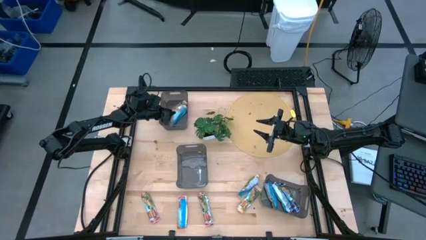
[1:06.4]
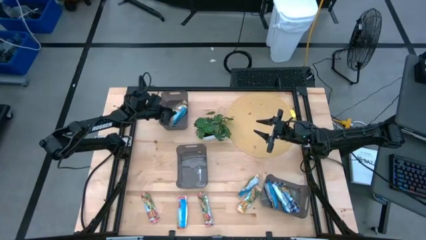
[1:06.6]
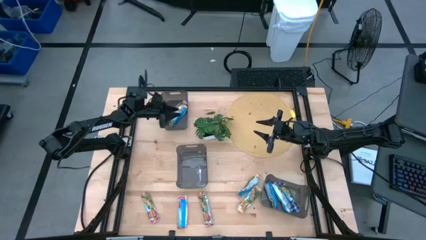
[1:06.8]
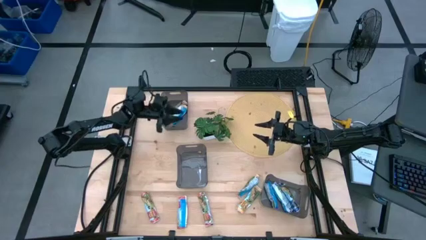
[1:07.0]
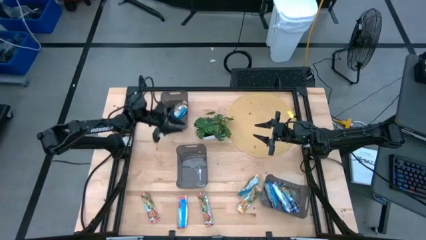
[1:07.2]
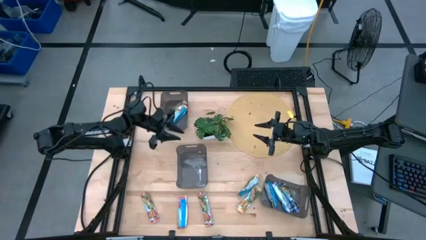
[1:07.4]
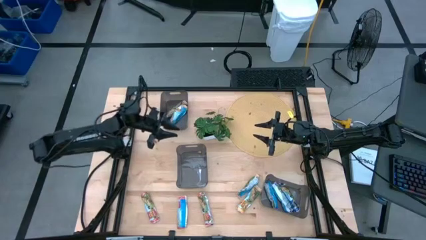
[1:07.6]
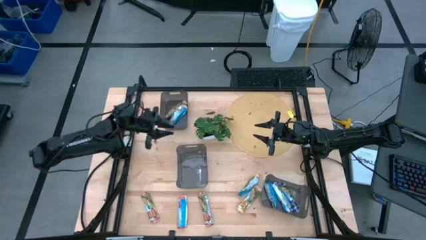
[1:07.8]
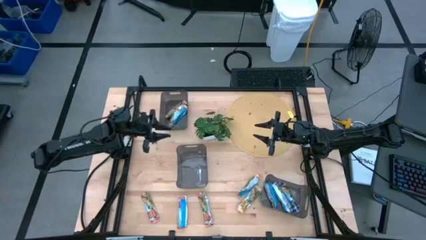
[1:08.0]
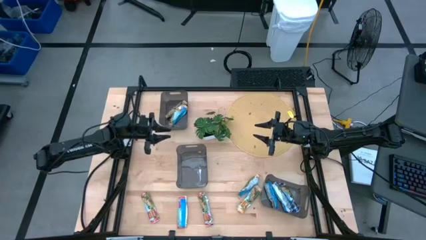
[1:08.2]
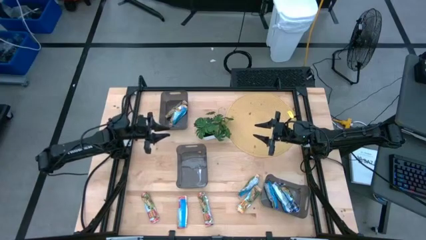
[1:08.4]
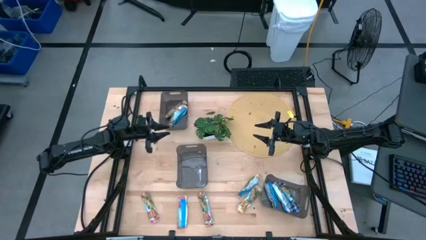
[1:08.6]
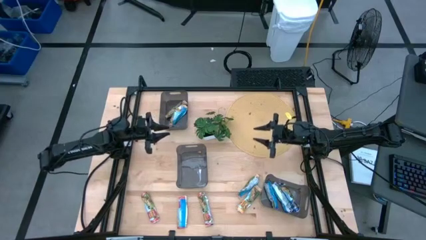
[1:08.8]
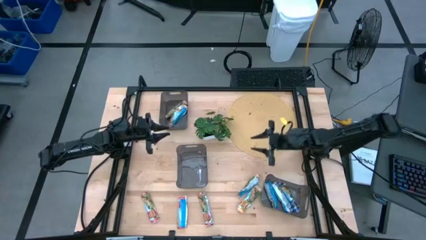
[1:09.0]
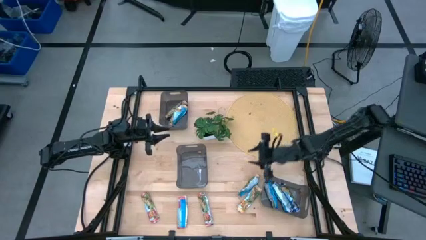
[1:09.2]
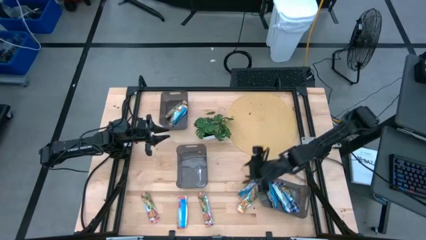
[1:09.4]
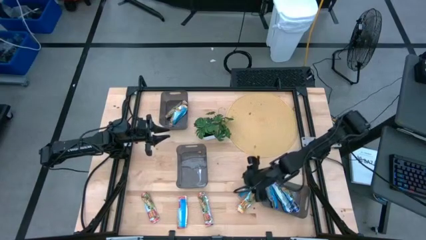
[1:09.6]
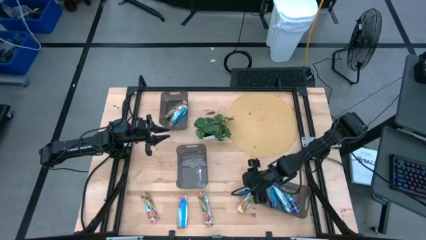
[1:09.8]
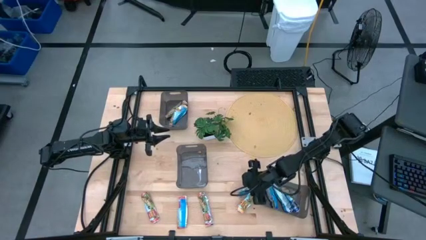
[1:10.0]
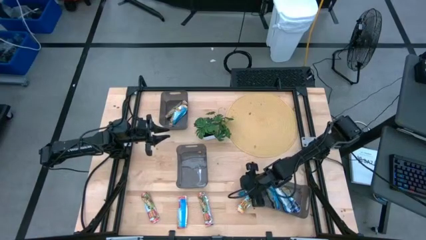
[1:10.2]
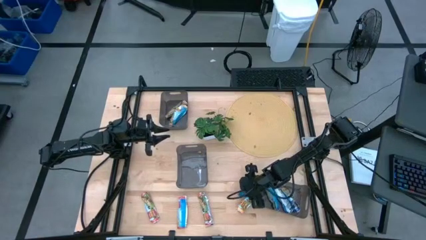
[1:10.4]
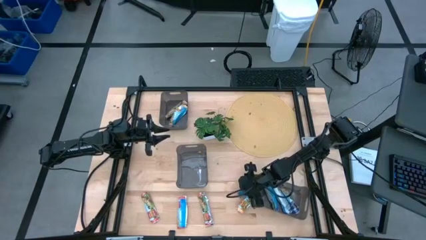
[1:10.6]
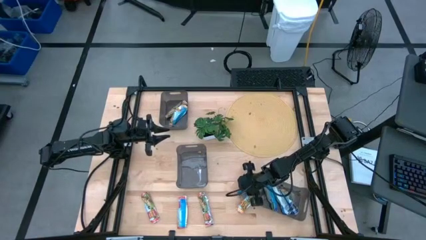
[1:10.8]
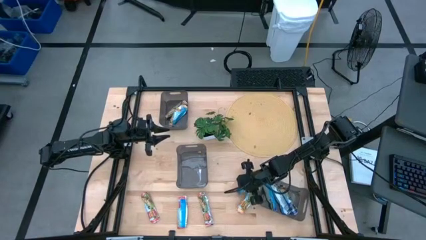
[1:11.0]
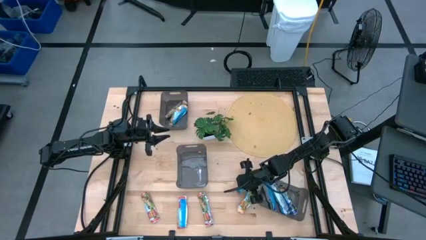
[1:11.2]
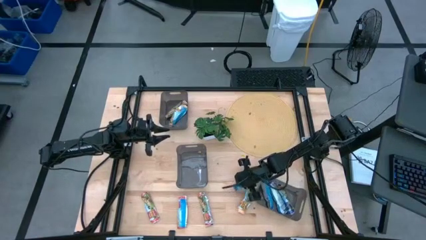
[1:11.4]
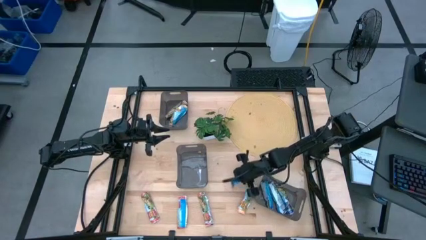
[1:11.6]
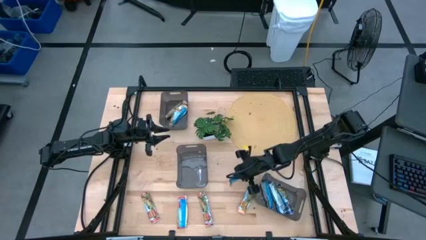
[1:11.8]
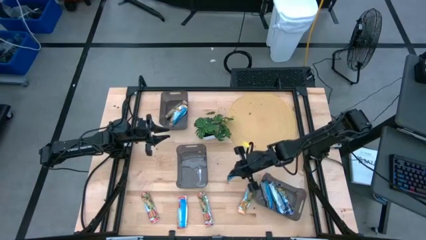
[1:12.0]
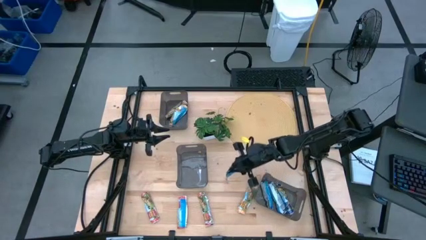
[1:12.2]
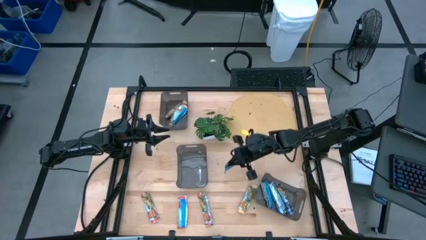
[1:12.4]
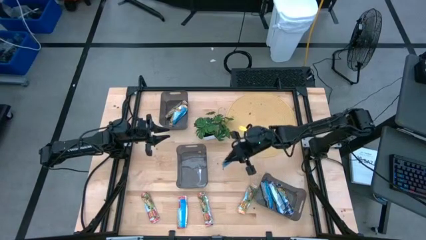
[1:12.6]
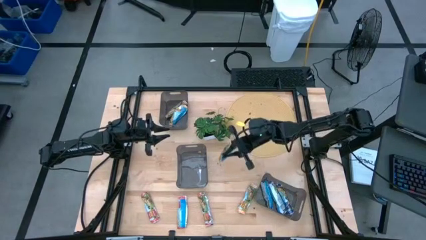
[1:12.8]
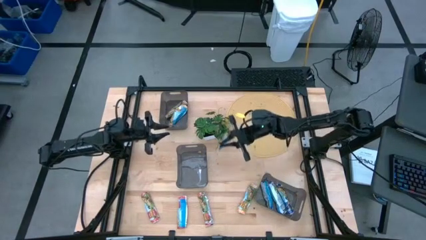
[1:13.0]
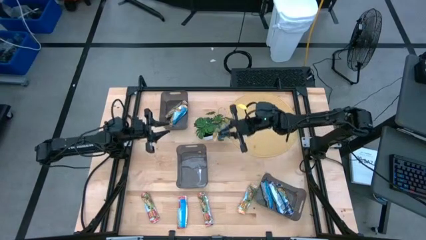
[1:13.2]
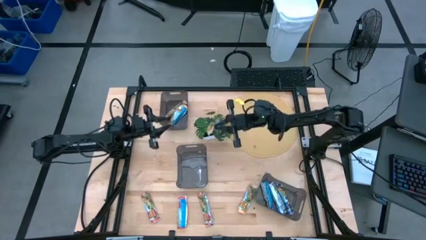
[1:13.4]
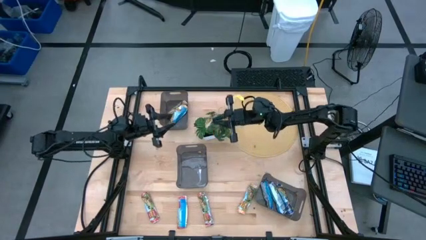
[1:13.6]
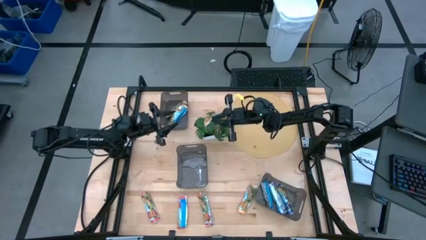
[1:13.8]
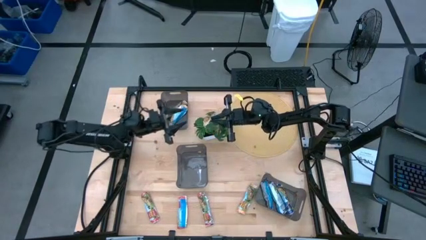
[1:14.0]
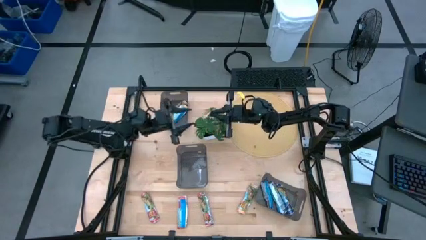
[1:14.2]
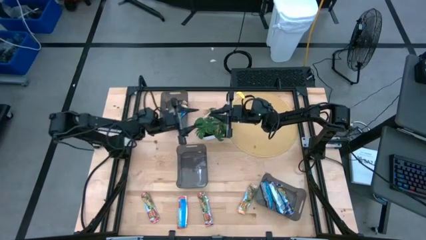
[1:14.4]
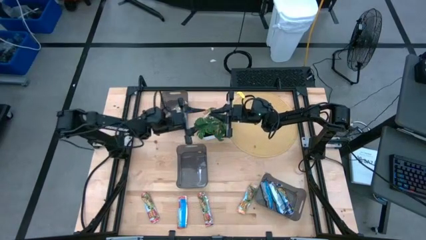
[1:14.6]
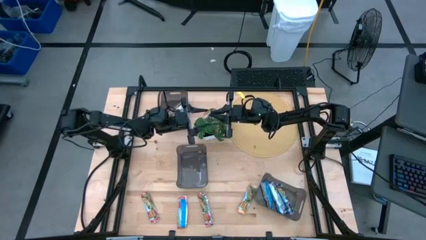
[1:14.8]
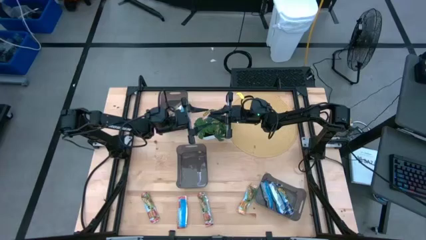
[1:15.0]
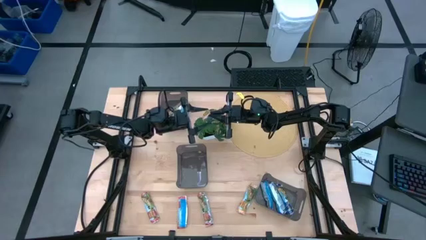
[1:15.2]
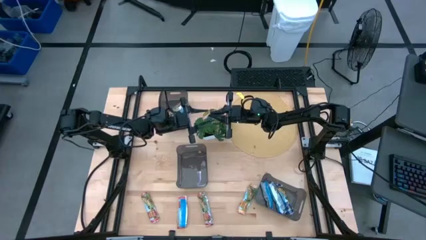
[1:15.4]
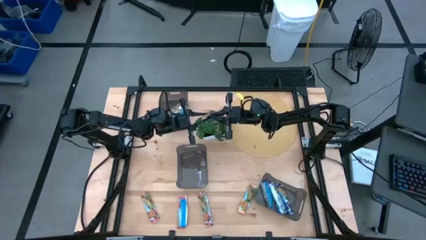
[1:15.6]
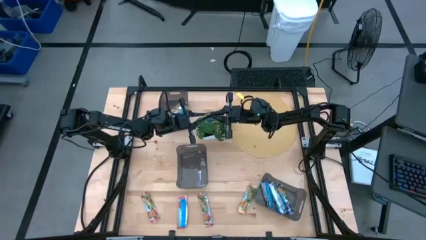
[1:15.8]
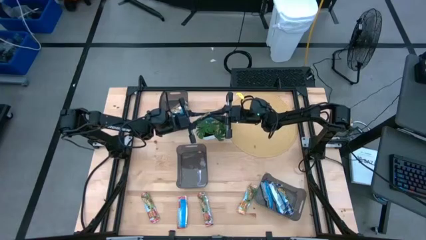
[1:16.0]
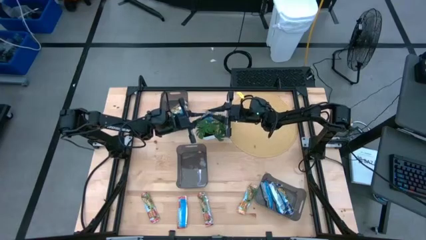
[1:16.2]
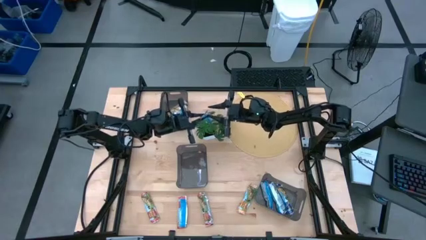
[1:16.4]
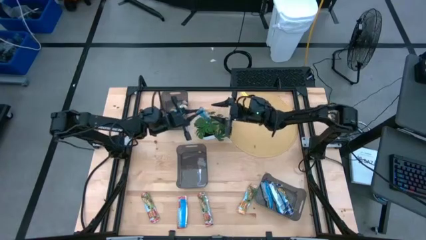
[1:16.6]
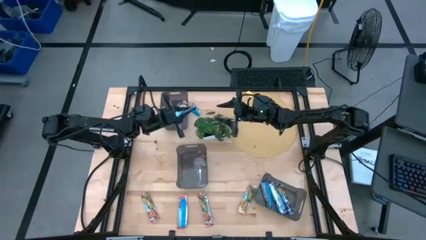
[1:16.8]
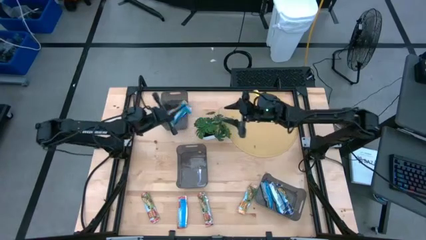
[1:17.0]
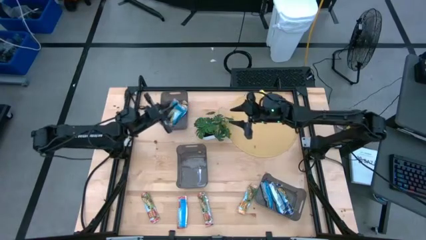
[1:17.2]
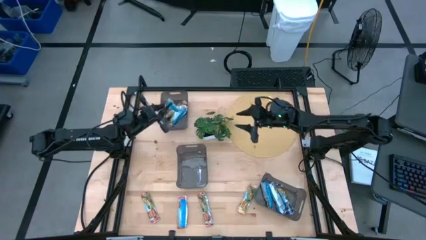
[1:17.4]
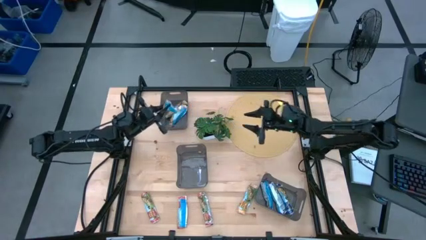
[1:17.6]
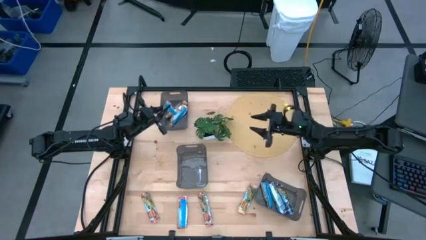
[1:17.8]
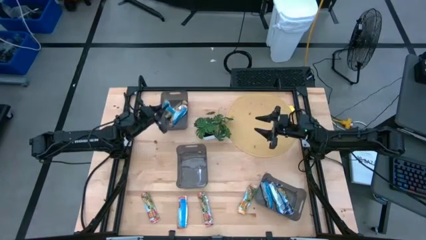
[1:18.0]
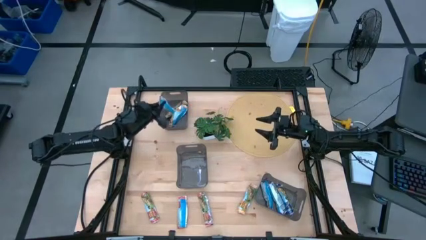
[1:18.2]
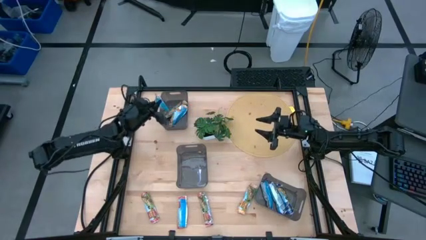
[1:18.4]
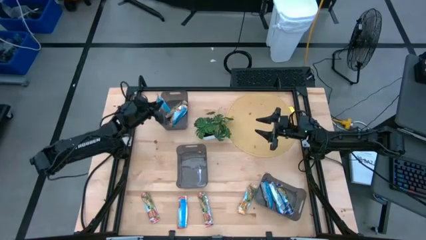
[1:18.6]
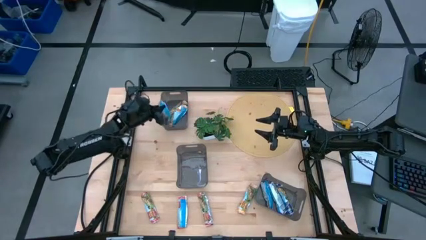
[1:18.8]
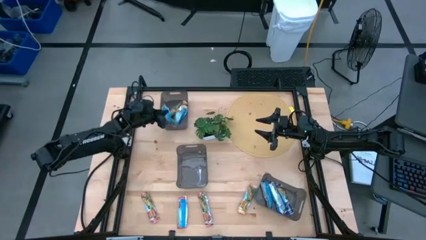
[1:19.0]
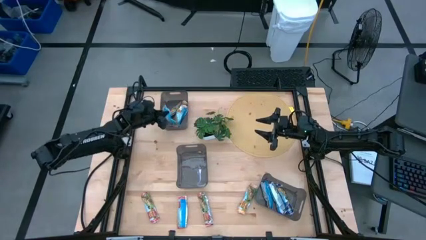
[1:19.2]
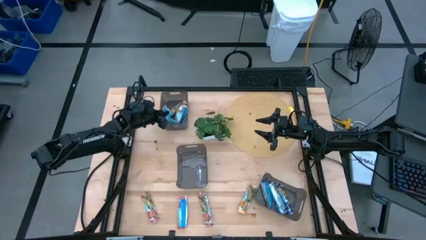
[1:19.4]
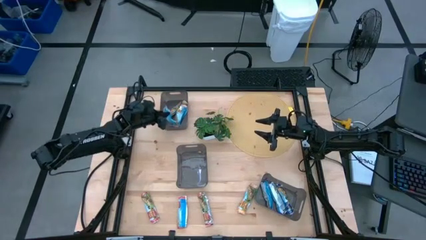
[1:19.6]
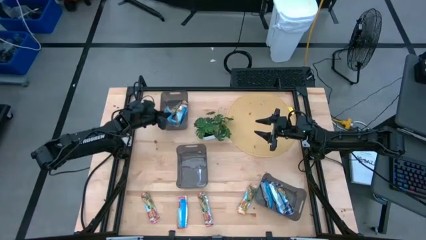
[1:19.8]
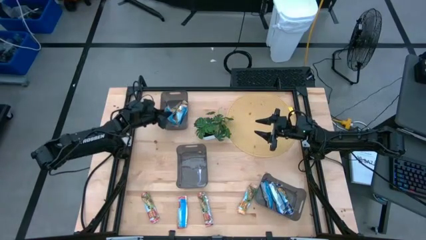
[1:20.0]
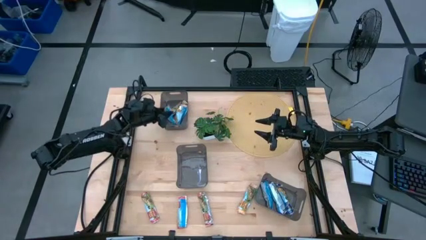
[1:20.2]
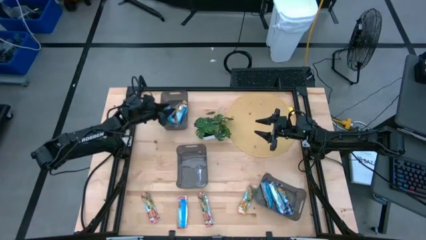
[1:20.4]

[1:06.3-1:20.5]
Task: Pick and place Granola Bars by type
Put the top orange granola bar into the top black bin
